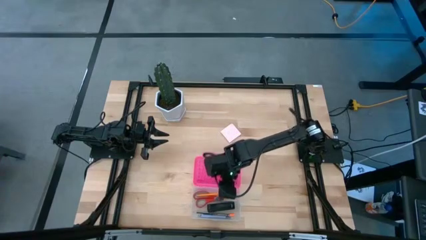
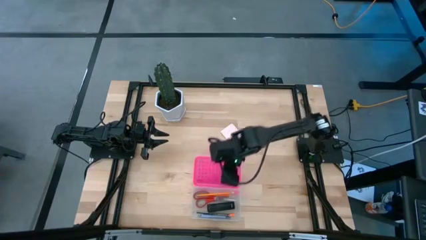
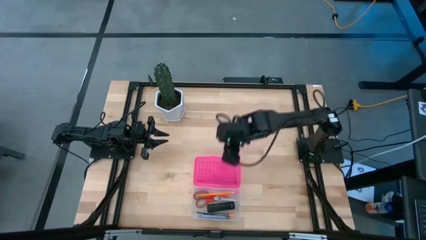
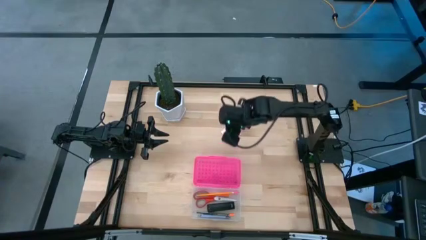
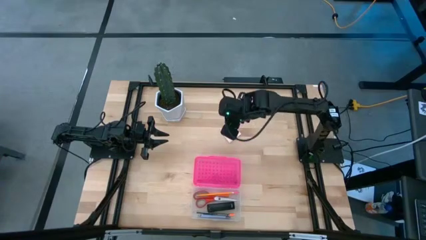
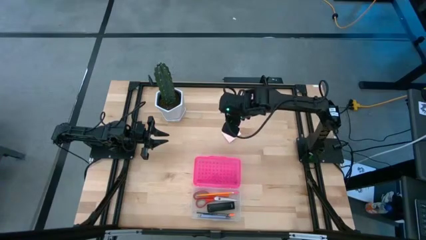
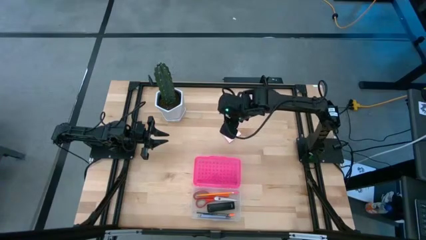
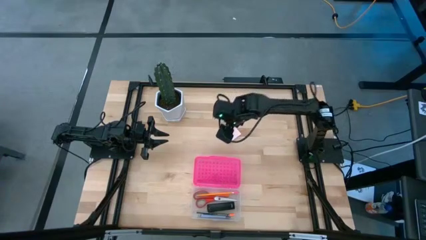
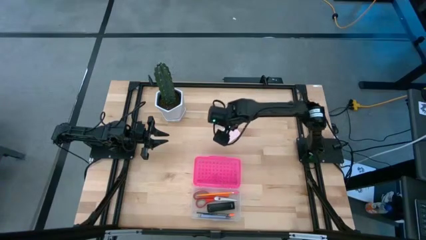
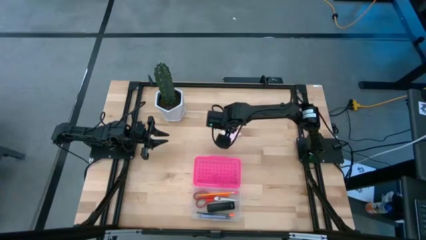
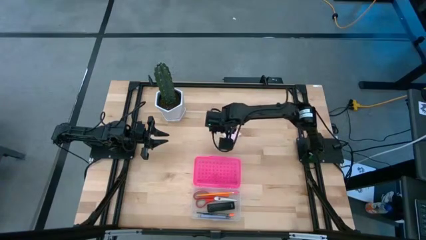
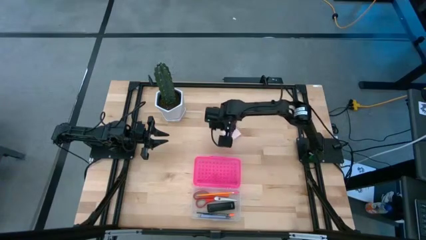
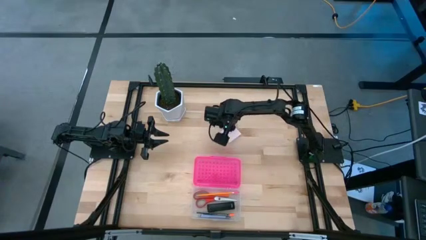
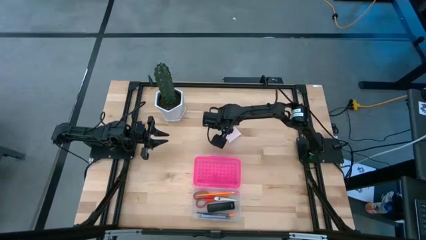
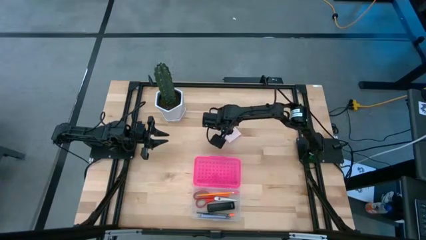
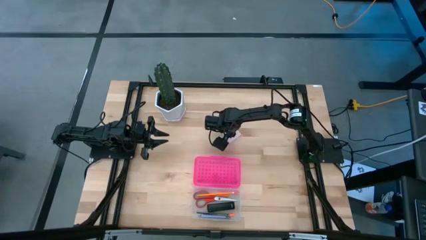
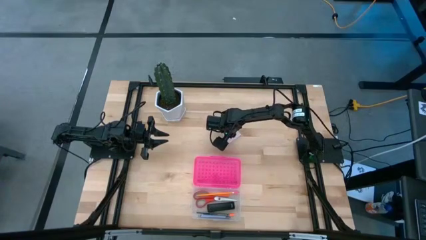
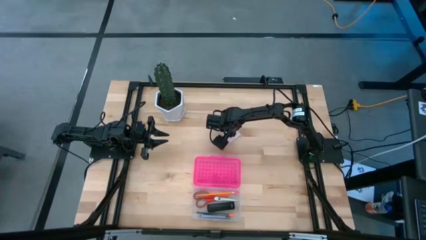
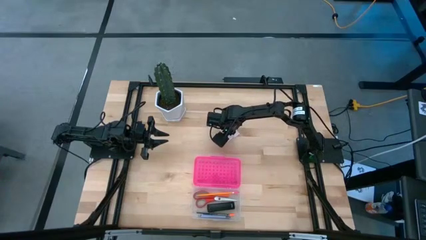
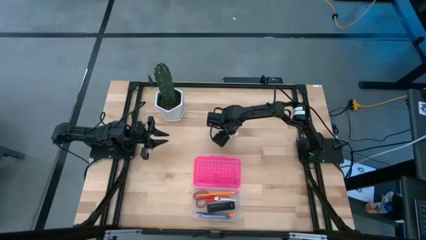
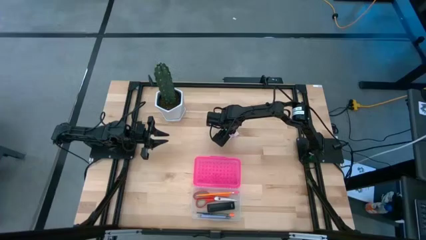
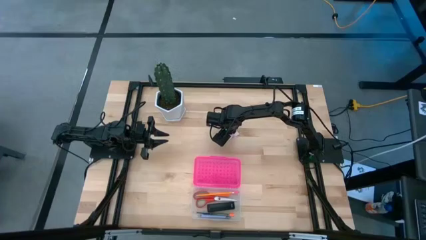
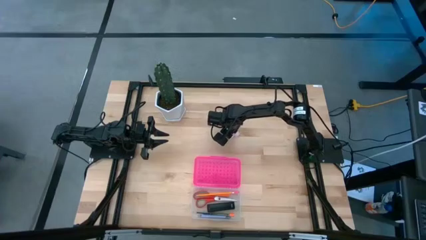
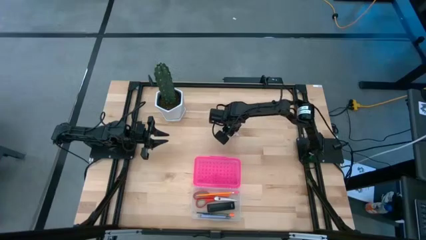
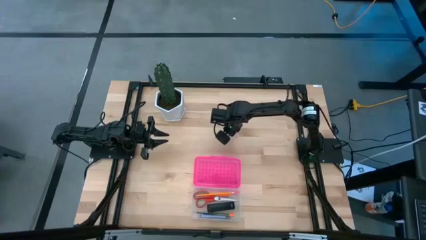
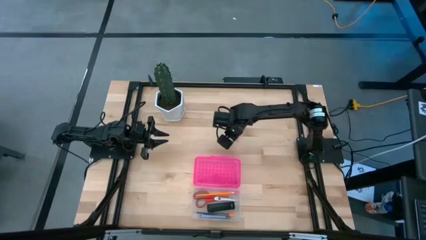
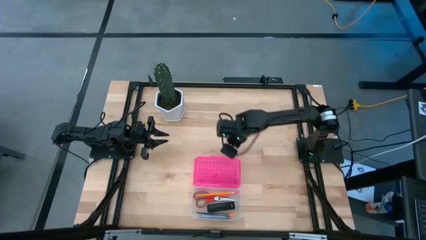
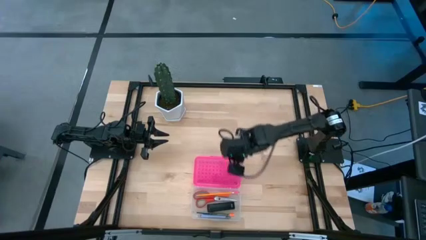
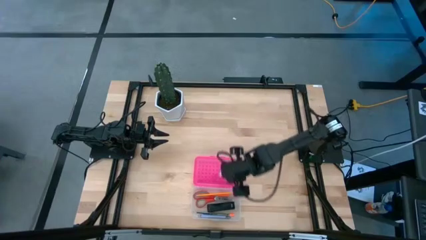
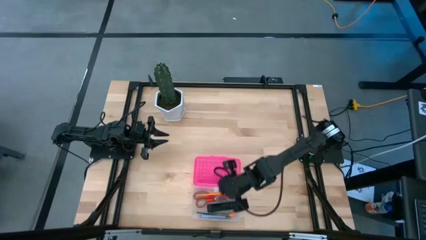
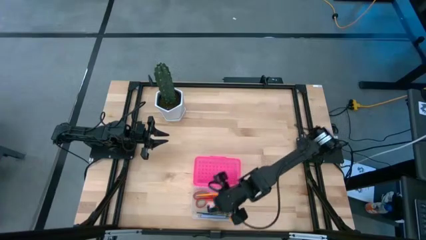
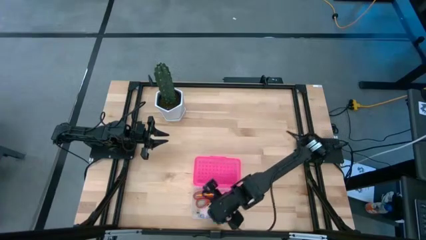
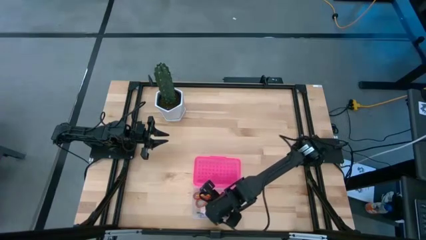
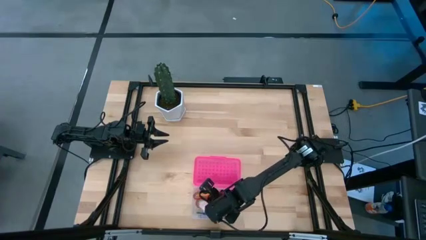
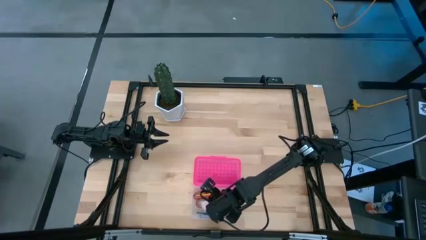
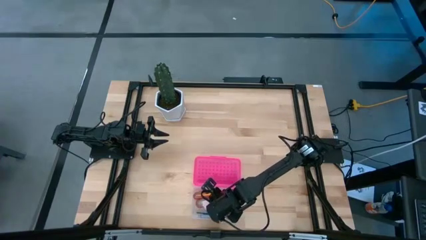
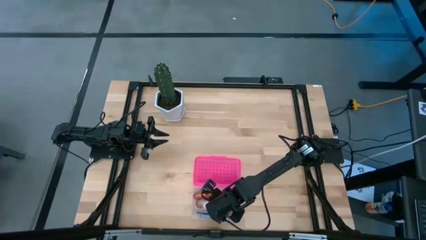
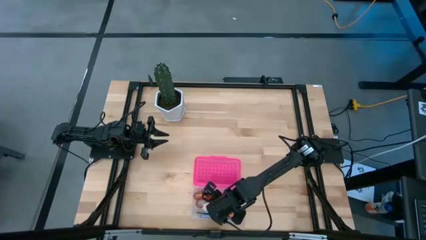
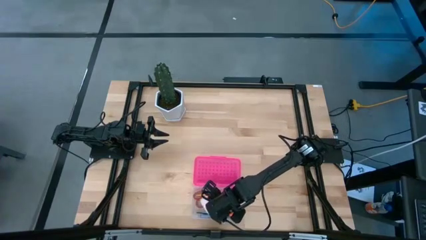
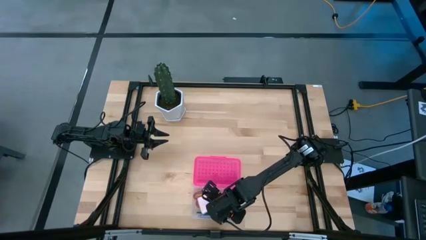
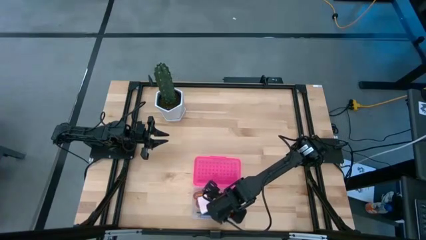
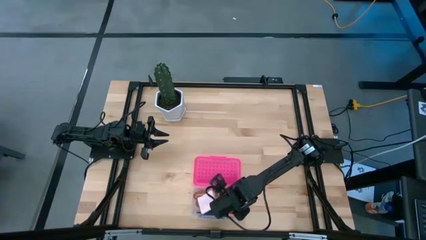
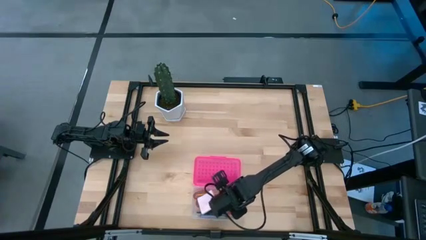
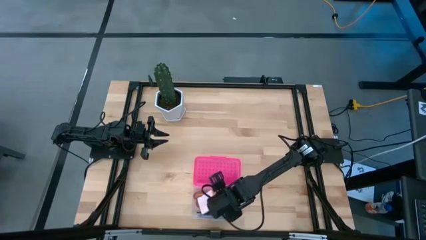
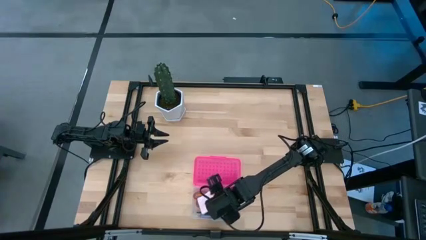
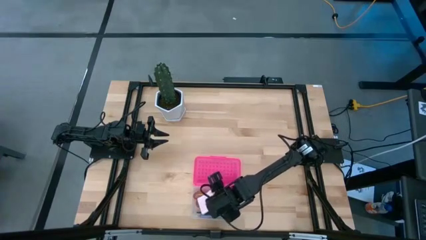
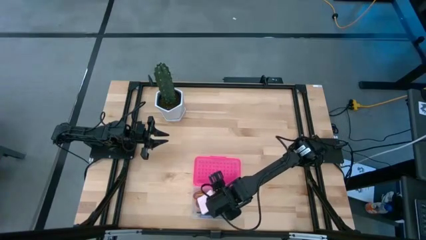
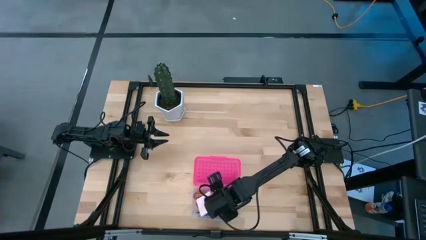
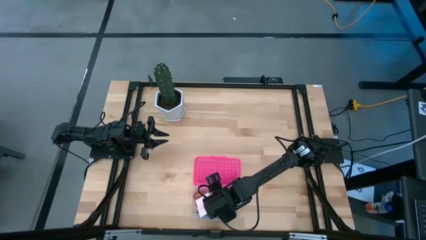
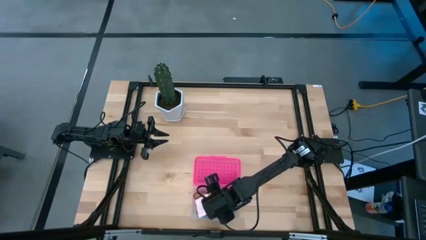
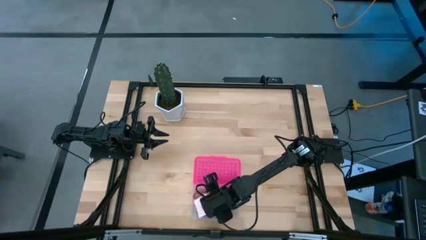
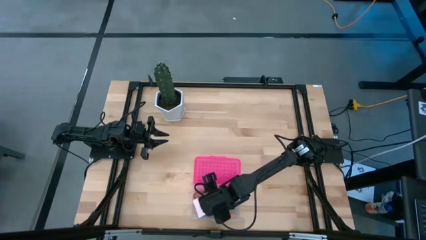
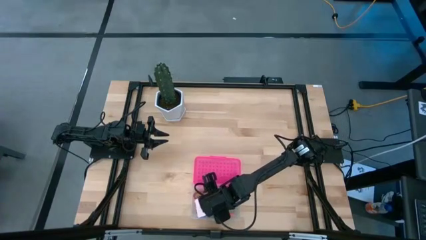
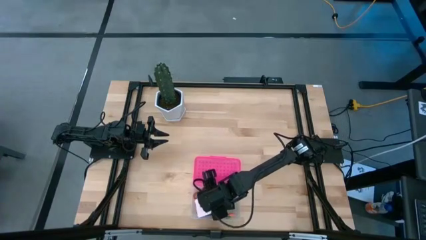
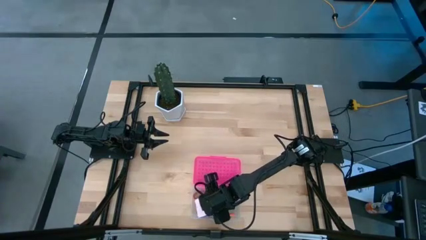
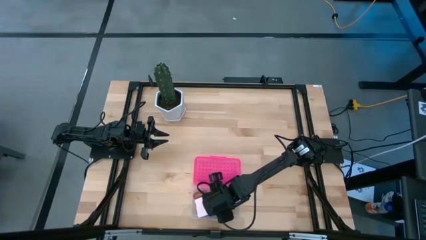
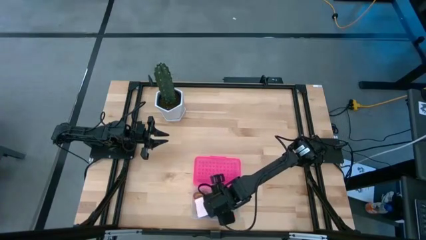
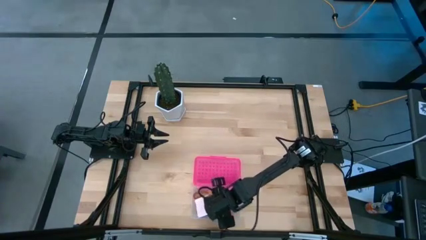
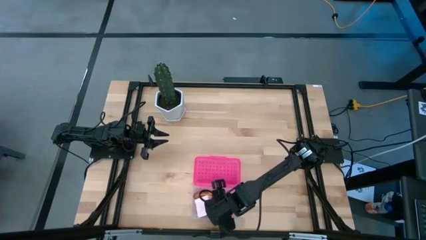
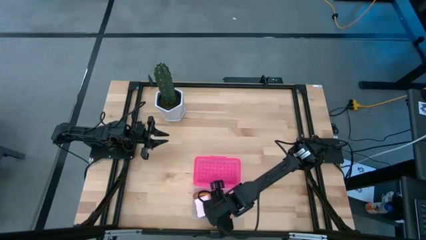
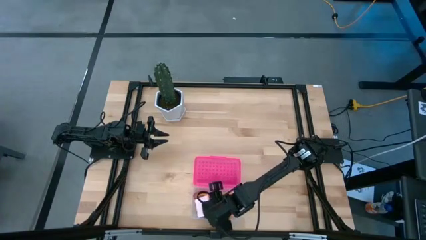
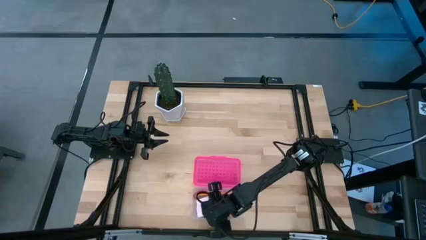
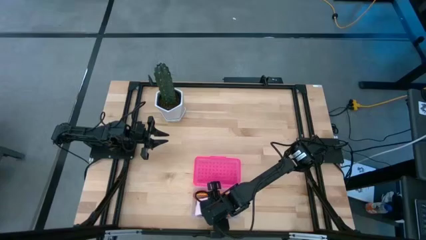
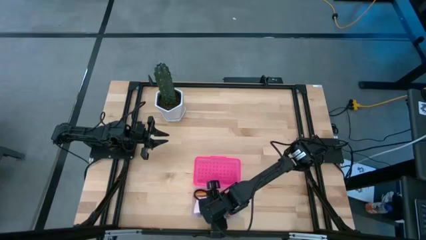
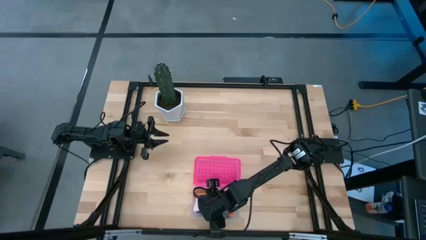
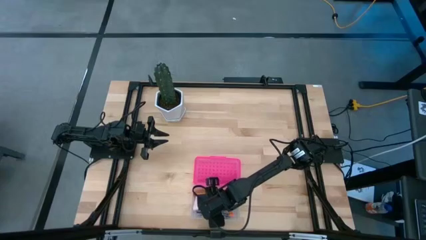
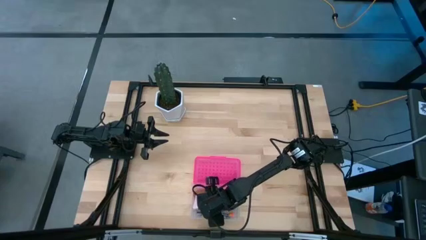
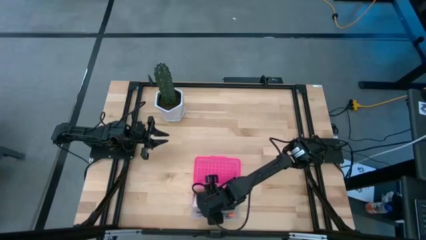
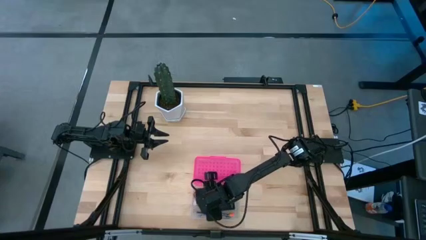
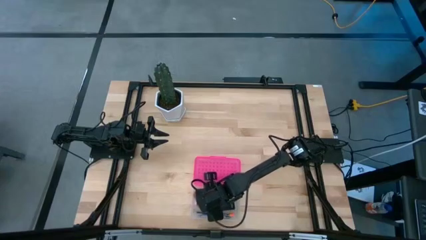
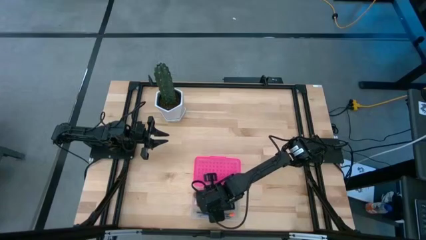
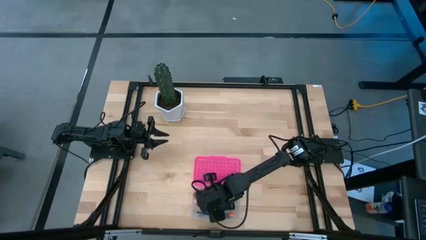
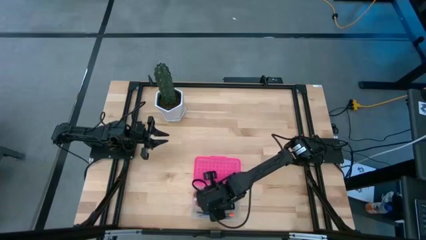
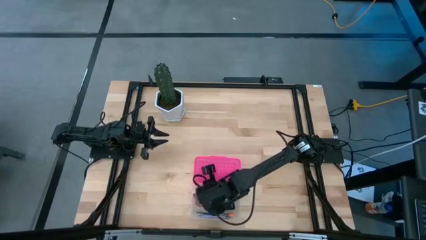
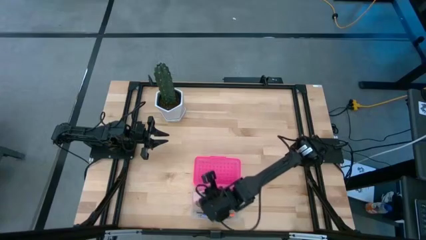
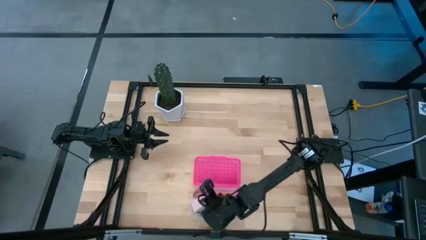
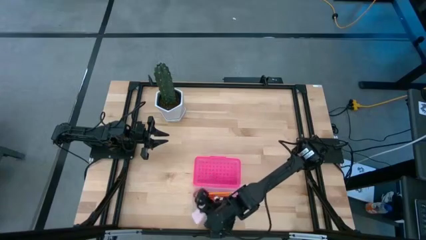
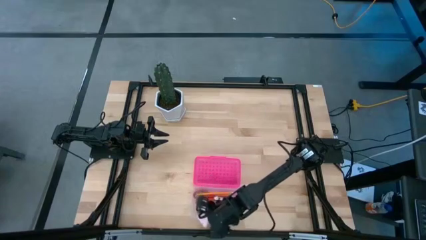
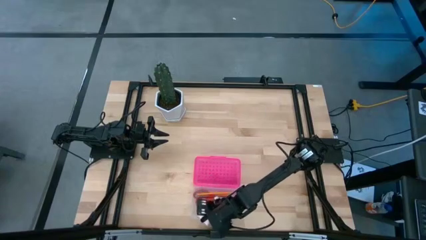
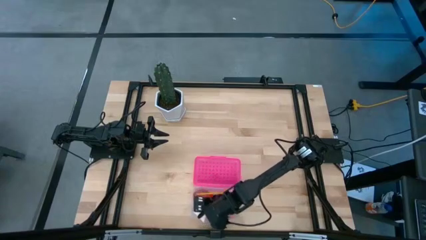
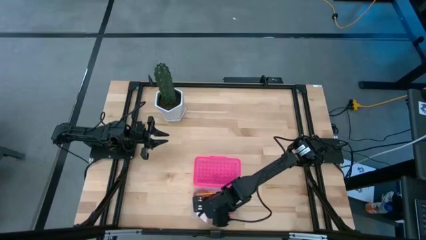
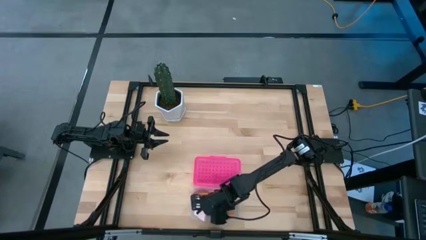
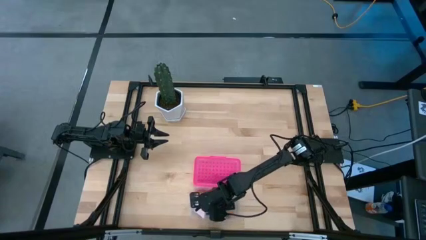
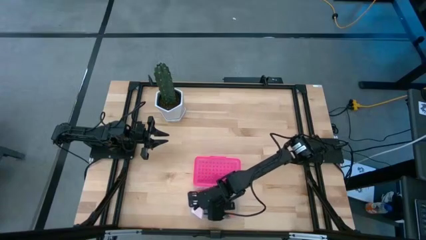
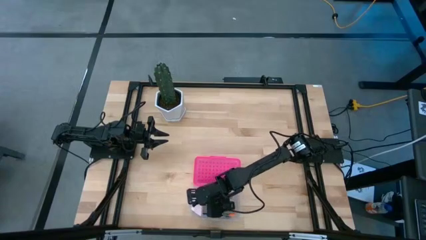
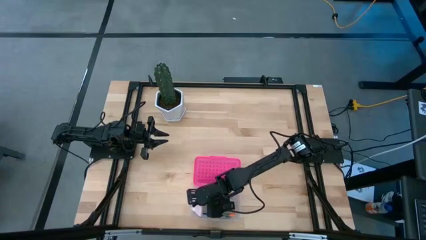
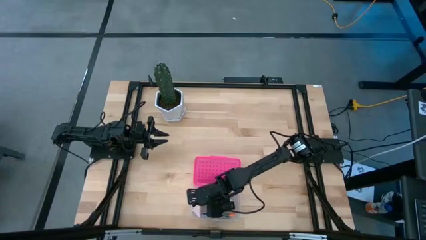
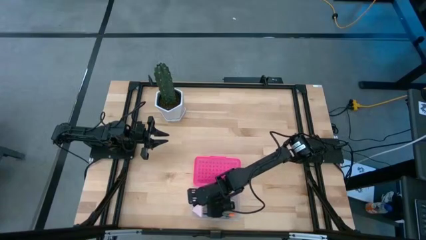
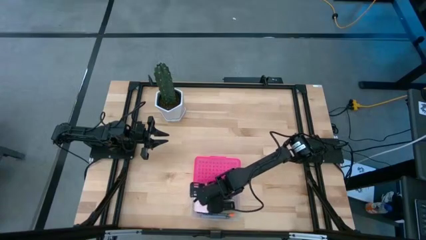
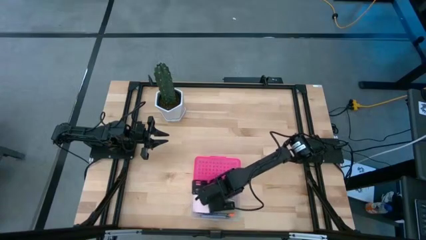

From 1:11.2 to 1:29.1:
Task: Pack school essentials
Put the pink sticky notes into the pencil case
